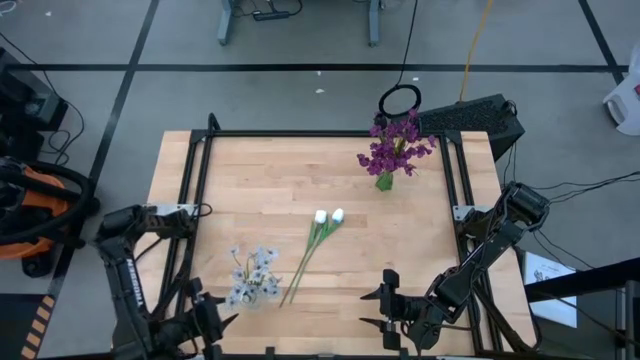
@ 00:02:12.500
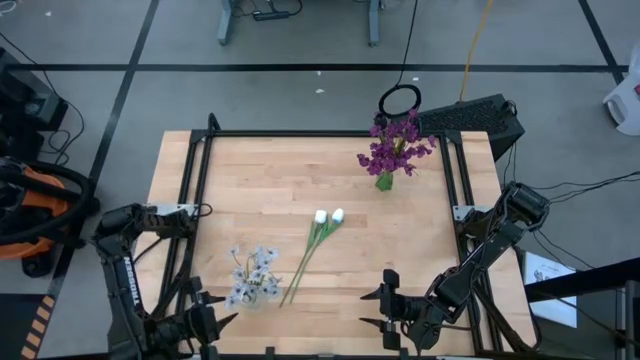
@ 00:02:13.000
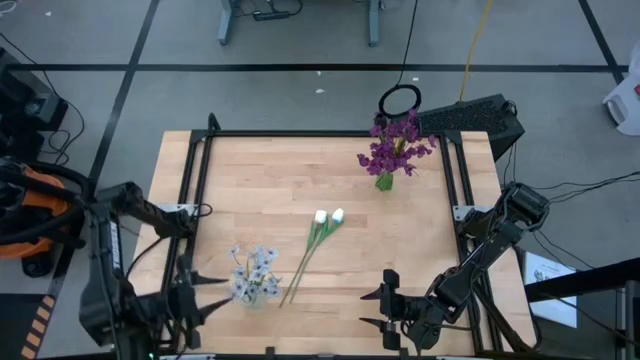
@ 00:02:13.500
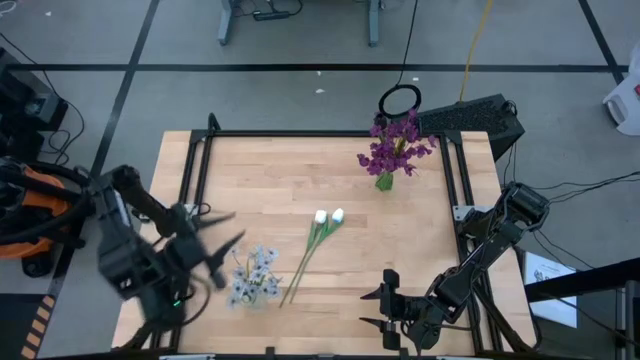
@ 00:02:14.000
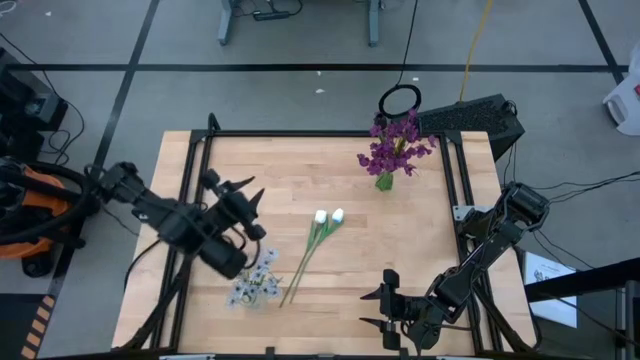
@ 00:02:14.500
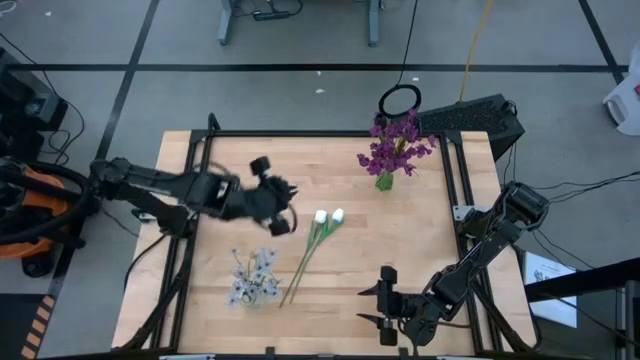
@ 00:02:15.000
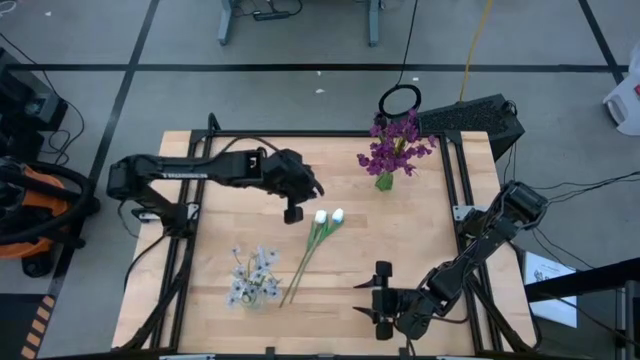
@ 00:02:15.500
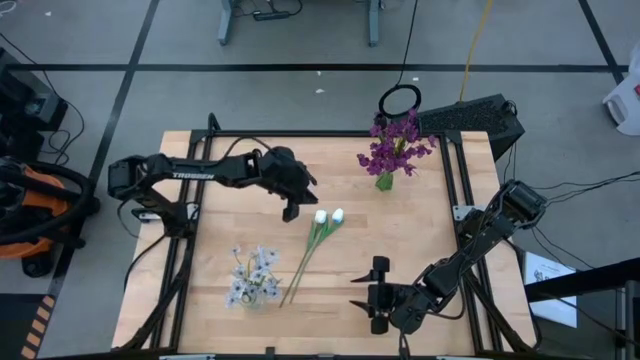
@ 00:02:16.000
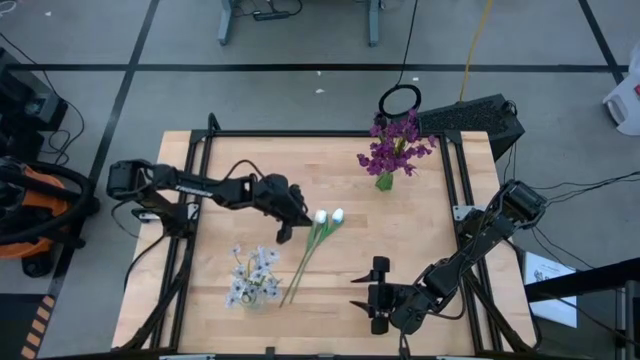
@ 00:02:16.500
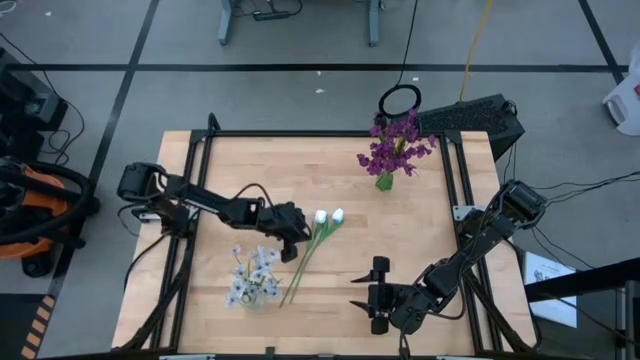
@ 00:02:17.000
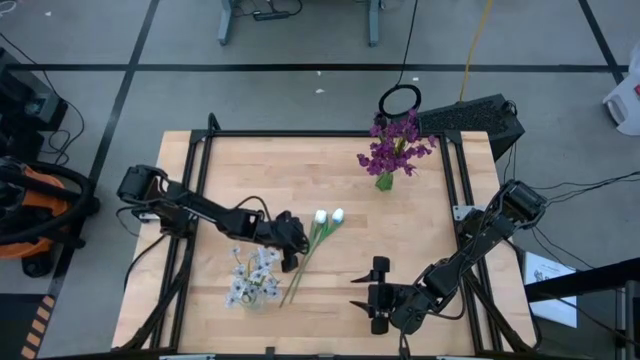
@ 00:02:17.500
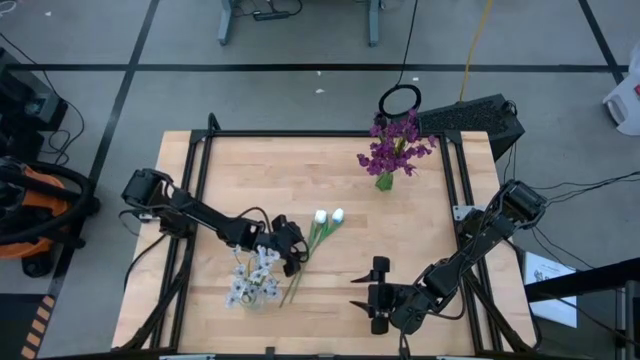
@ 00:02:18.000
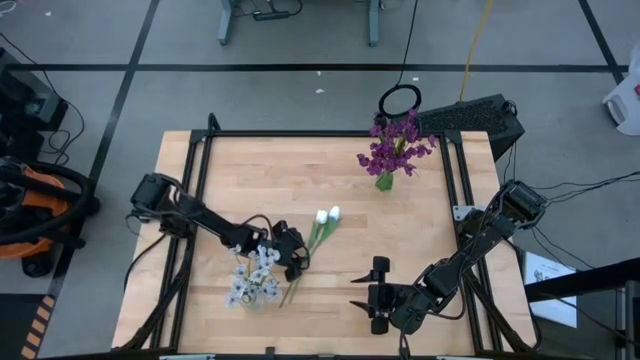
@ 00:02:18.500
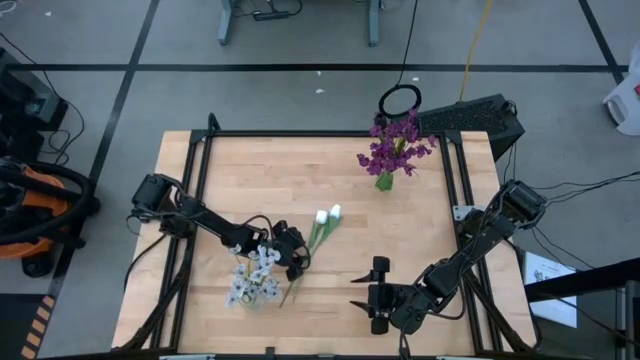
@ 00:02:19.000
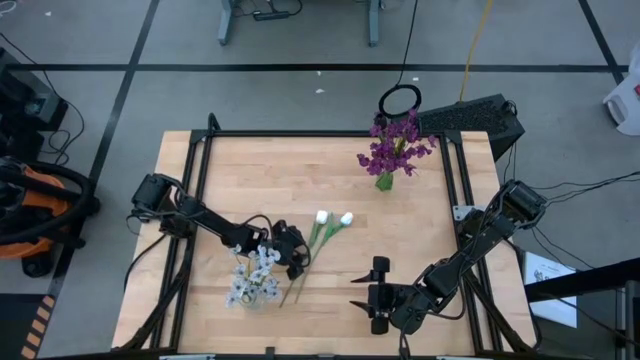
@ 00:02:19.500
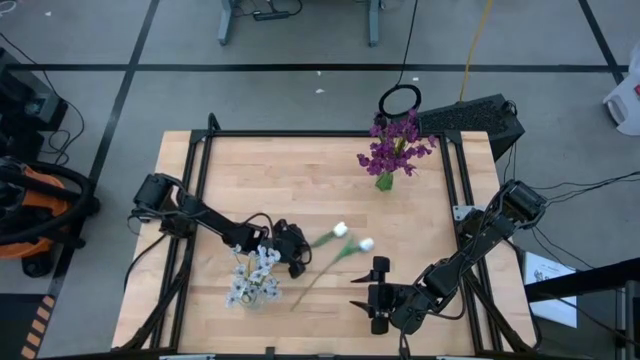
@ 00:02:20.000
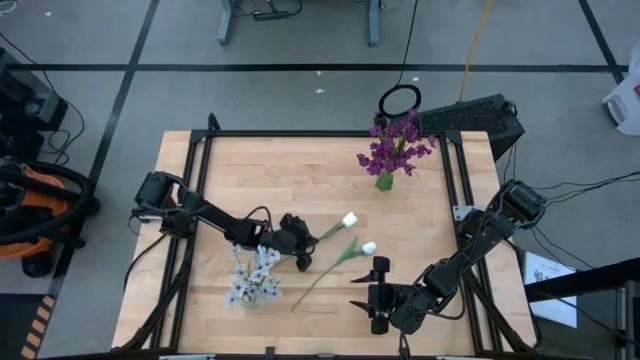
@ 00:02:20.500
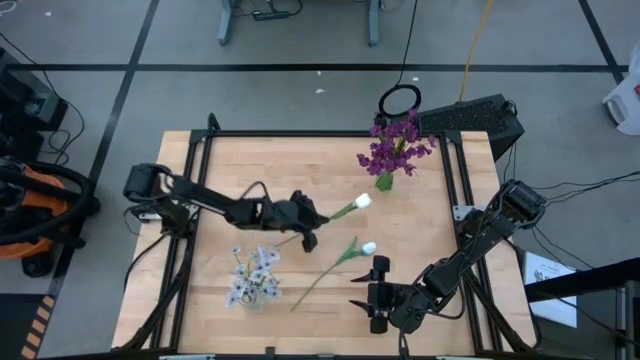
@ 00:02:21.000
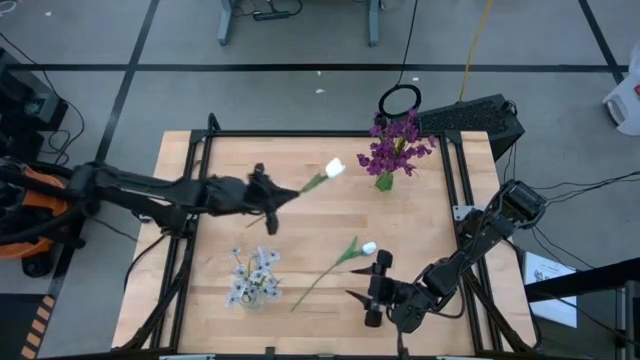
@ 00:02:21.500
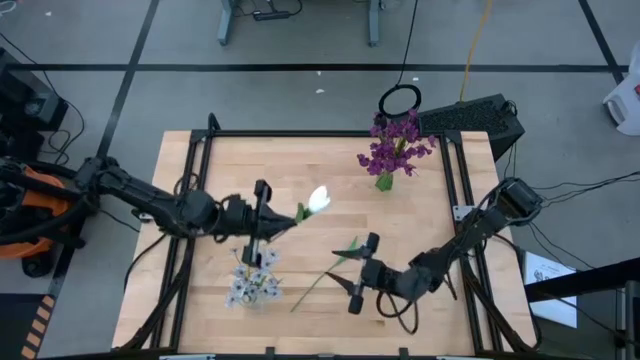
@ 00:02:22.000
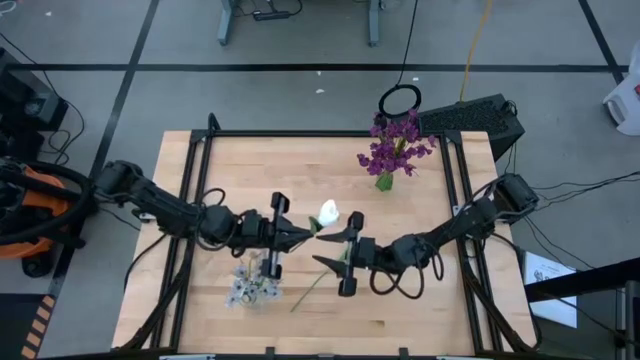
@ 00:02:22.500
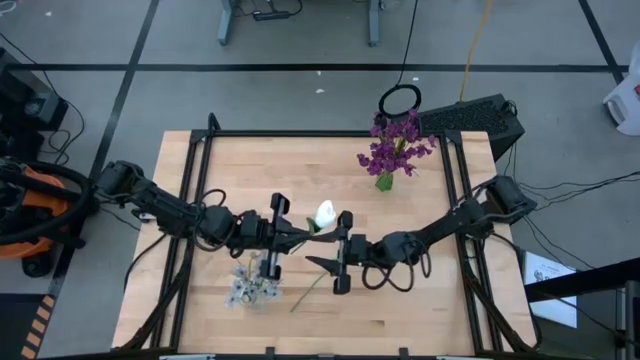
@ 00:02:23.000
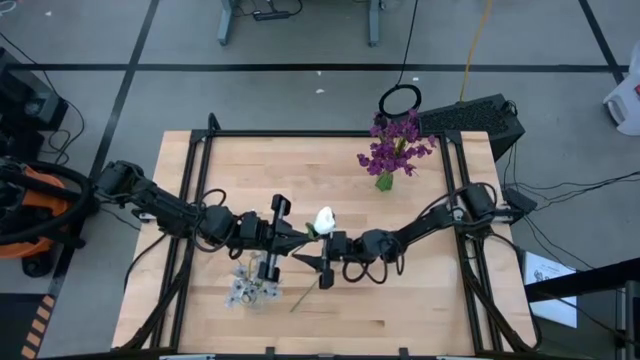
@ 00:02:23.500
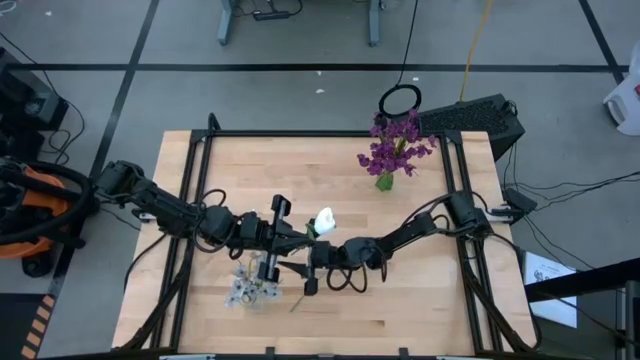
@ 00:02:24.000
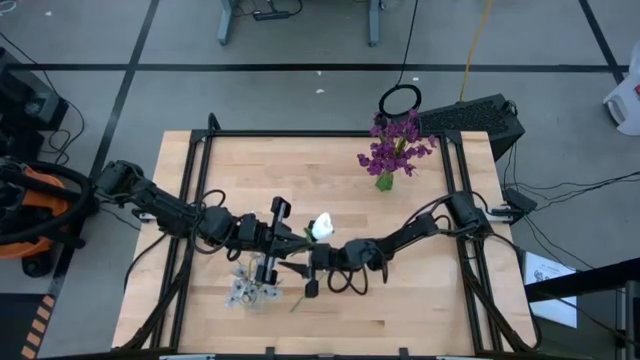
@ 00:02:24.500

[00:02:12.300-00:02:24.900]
Task: Sort flowers into vase by color
Put the left white flower into the transparent vase

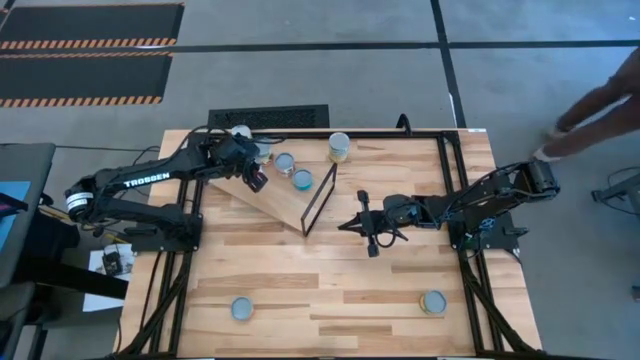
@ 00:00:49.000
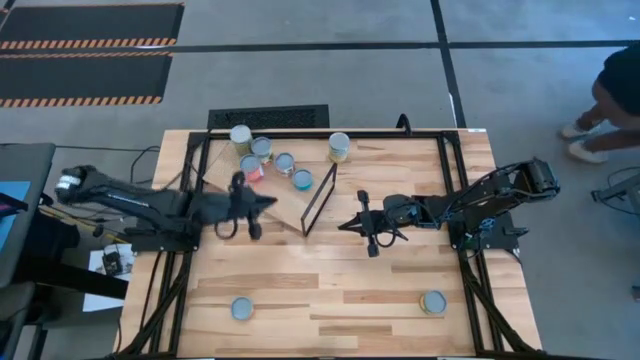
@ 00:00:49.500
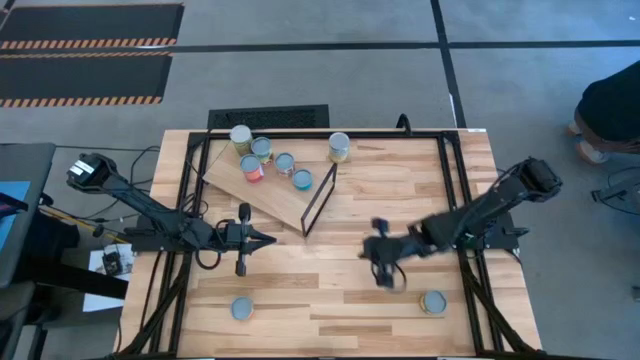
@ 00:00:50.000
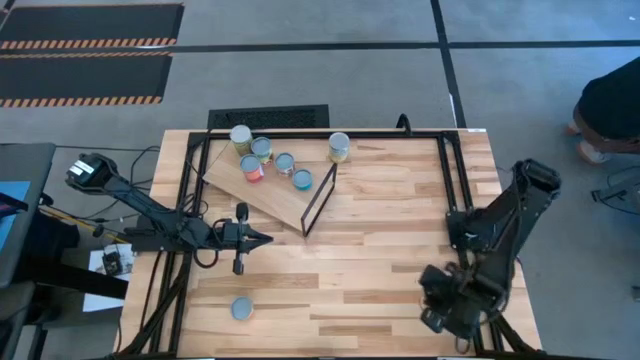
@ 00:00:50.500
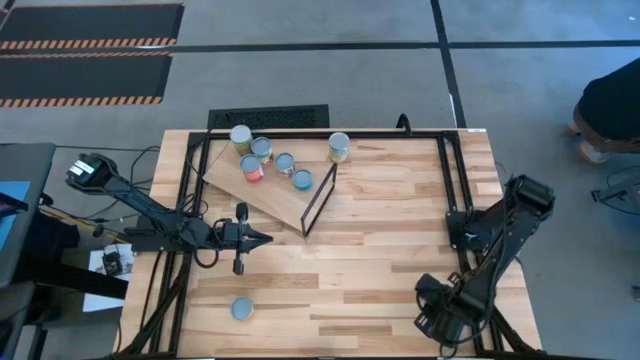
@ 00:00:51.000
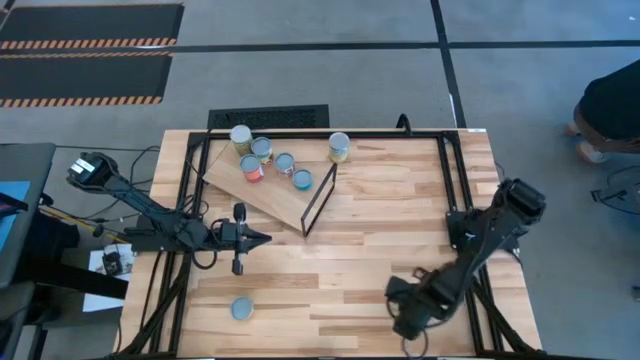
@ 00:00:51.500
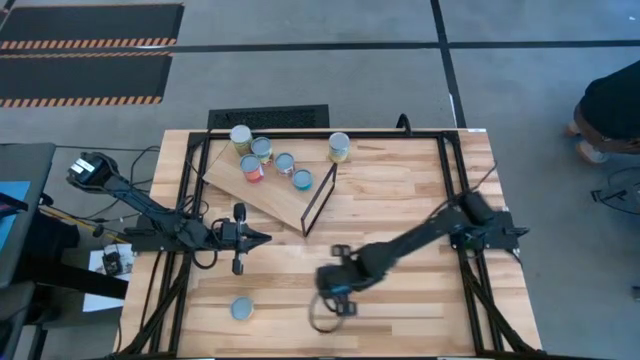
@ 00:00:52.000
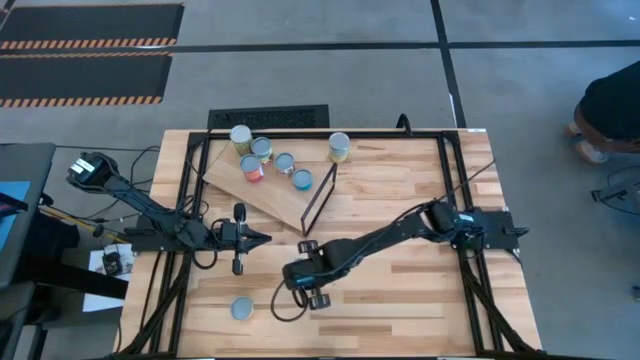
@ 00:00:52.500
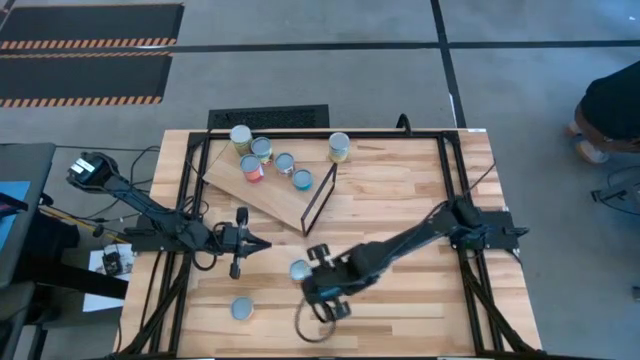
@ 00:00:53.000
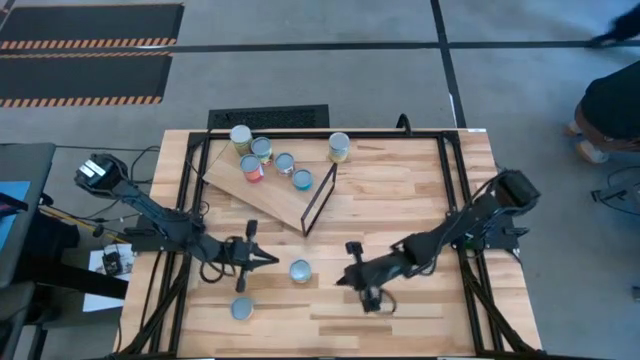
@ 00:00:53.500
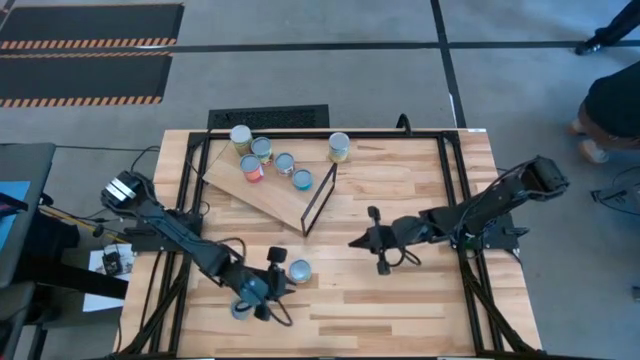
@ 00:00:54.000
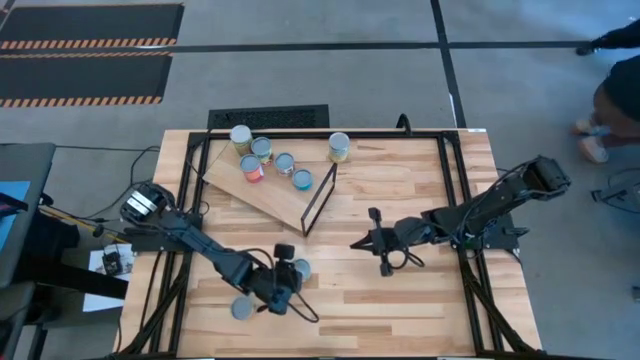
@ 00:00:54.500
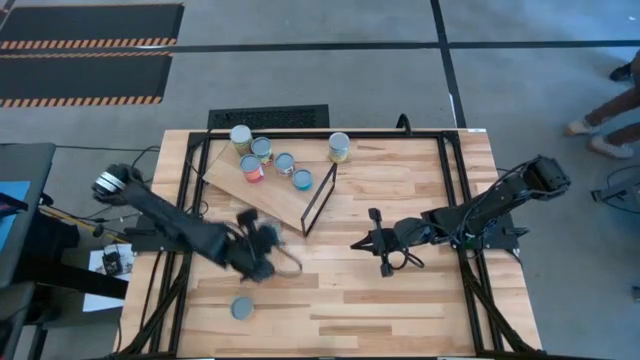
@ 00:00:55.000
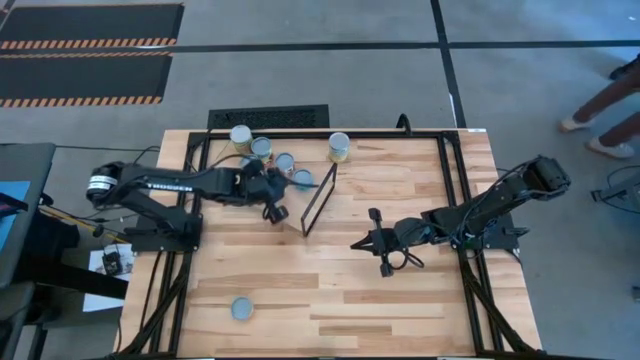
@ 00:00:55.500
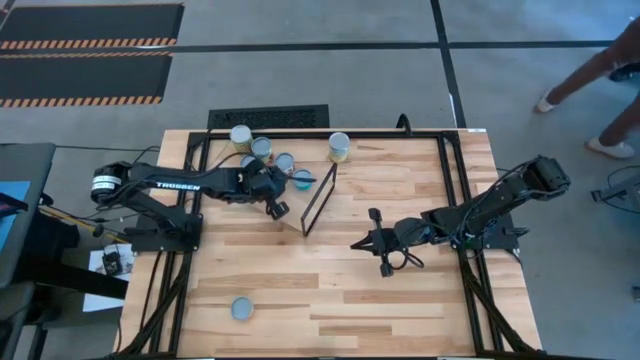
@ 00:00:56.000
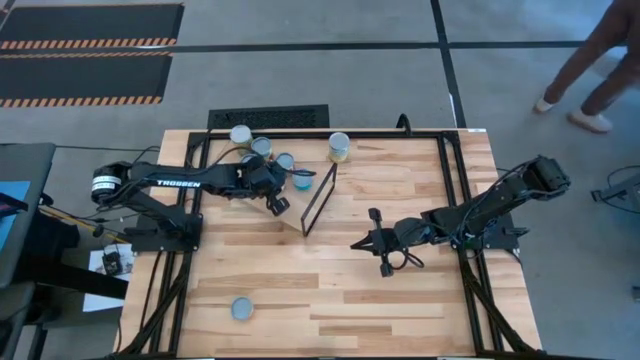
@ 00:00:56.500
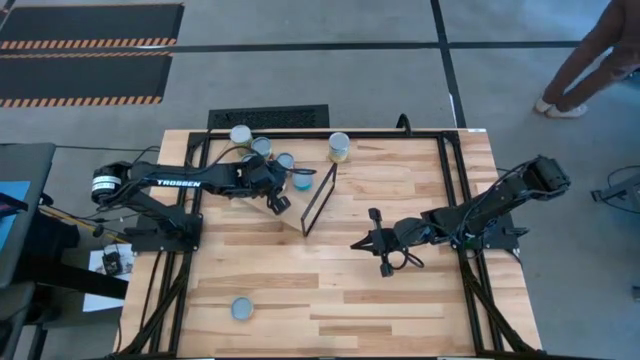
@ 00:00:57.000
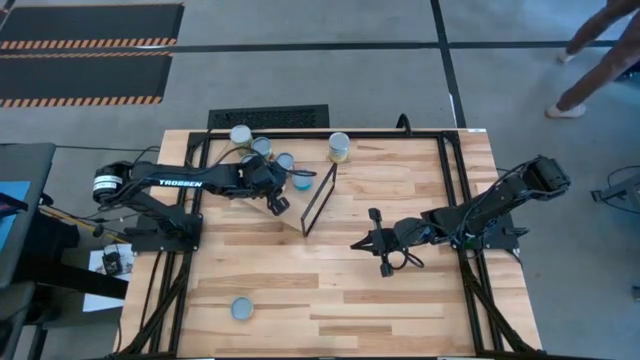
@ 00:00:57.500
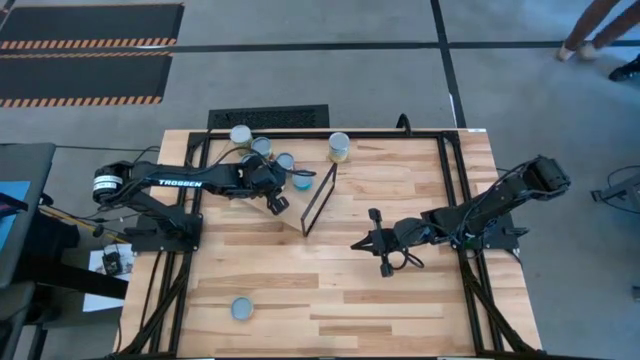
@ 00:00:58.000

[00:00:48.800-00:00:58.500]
Task: Pick and place cans onto a shelf
Put the canned peaches on the shelf
